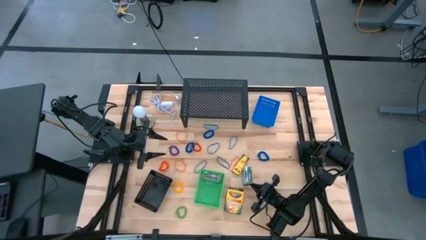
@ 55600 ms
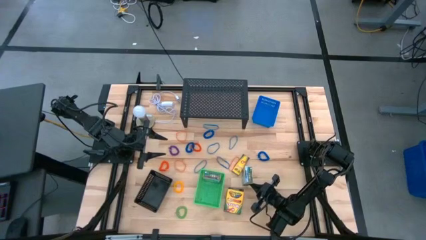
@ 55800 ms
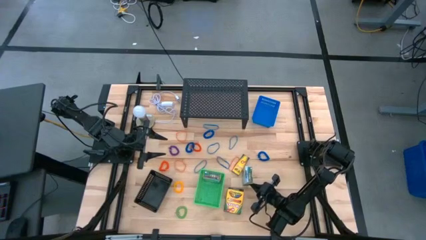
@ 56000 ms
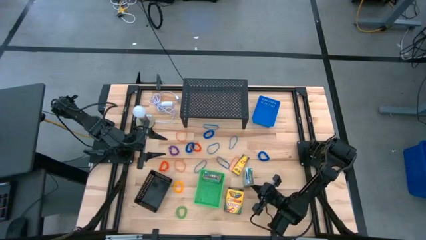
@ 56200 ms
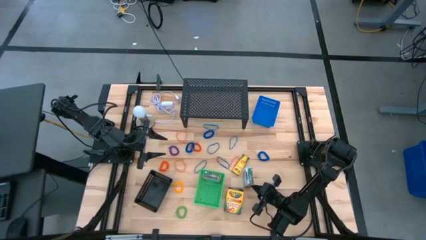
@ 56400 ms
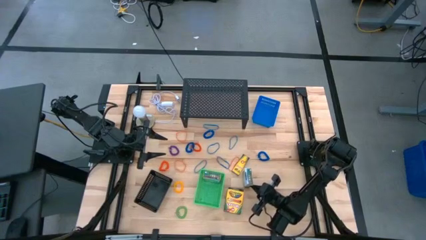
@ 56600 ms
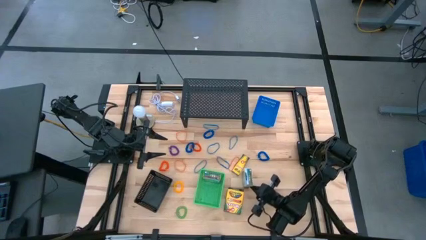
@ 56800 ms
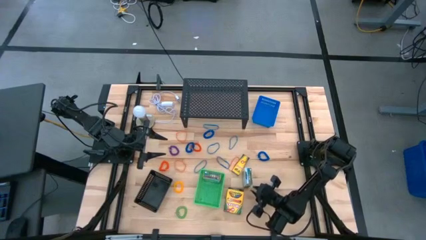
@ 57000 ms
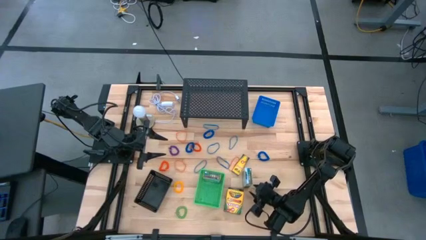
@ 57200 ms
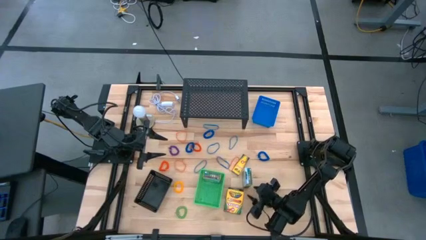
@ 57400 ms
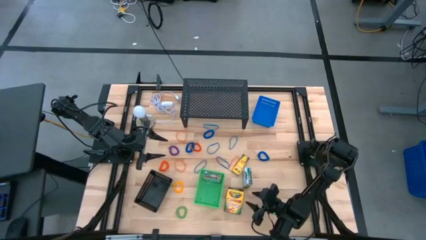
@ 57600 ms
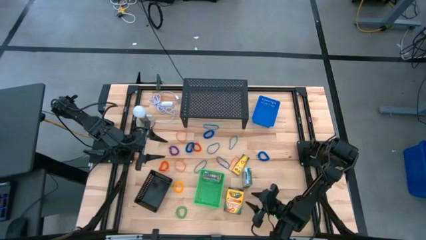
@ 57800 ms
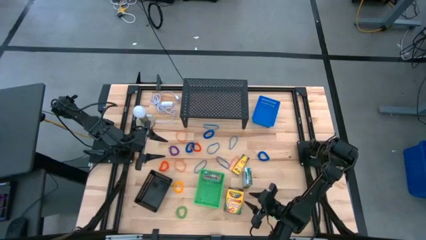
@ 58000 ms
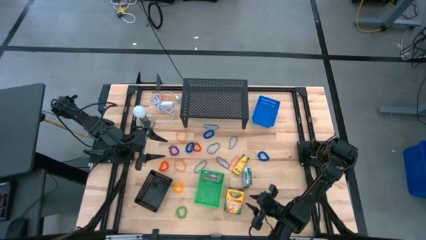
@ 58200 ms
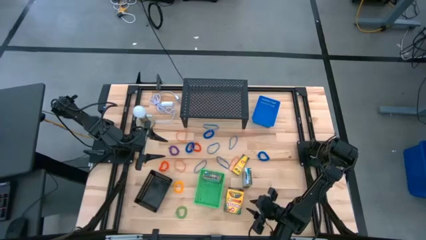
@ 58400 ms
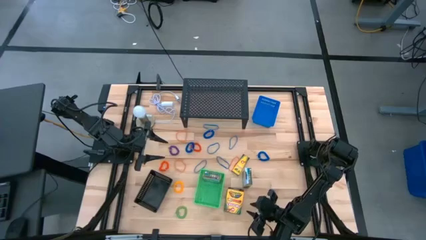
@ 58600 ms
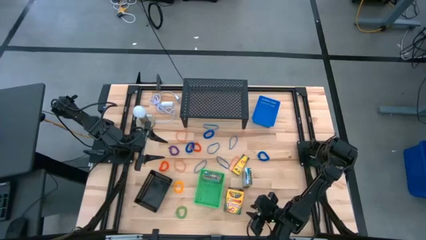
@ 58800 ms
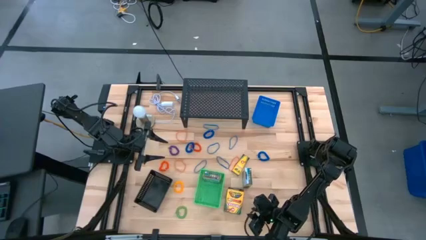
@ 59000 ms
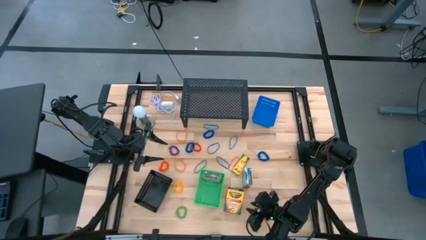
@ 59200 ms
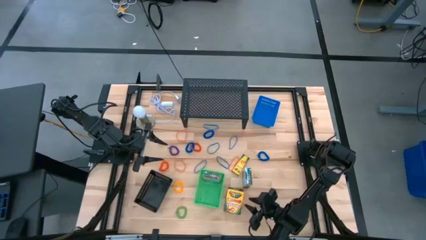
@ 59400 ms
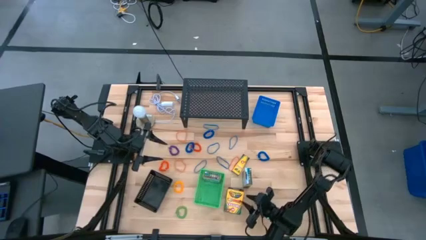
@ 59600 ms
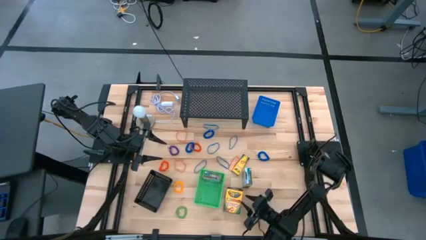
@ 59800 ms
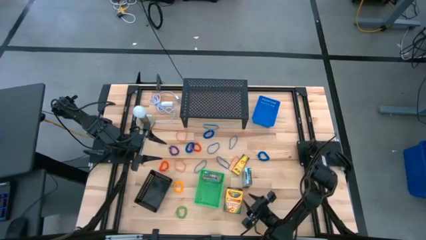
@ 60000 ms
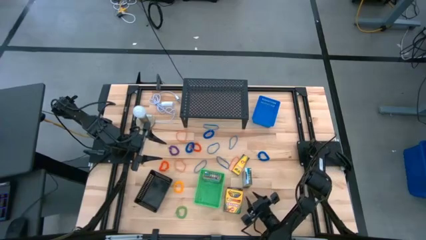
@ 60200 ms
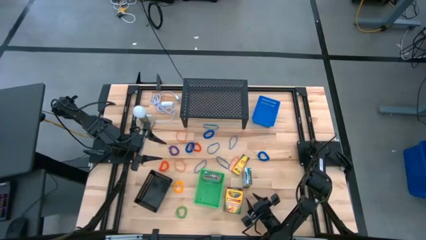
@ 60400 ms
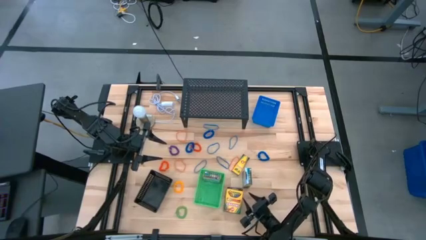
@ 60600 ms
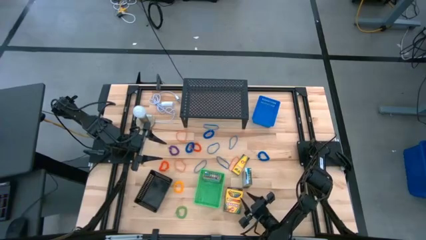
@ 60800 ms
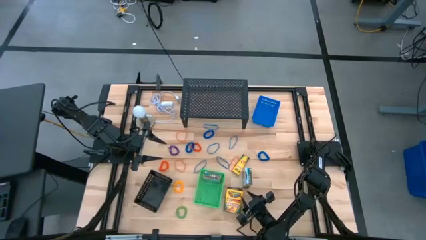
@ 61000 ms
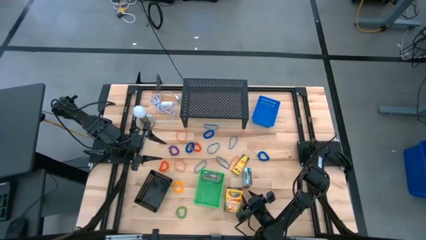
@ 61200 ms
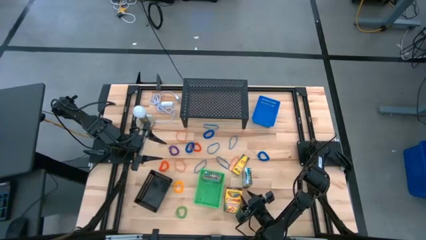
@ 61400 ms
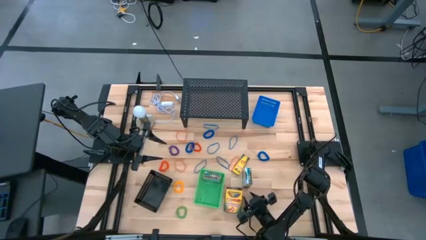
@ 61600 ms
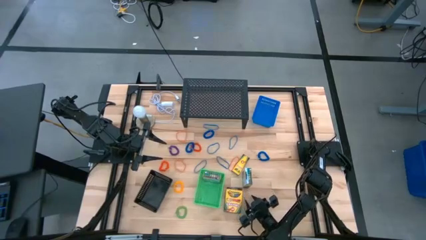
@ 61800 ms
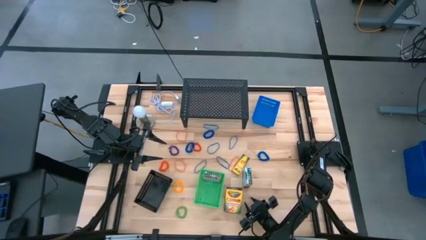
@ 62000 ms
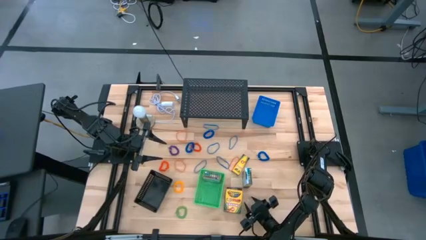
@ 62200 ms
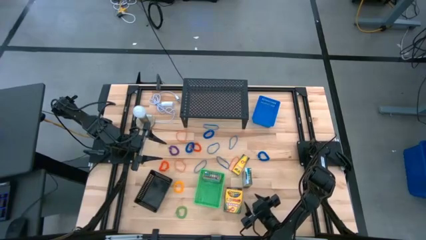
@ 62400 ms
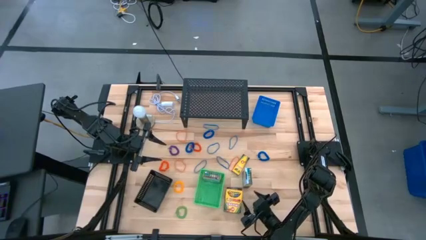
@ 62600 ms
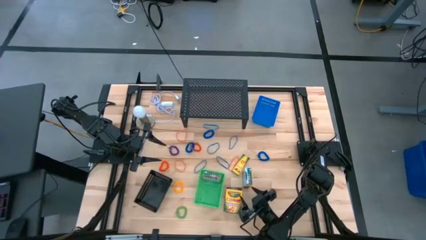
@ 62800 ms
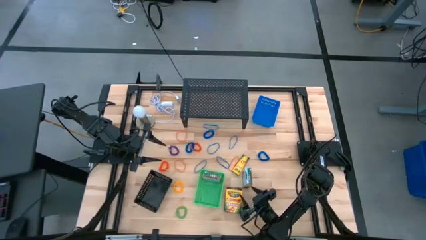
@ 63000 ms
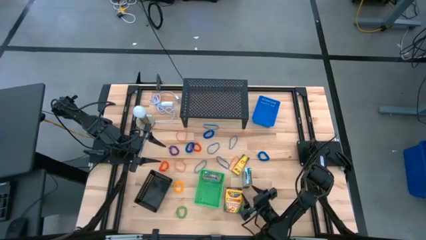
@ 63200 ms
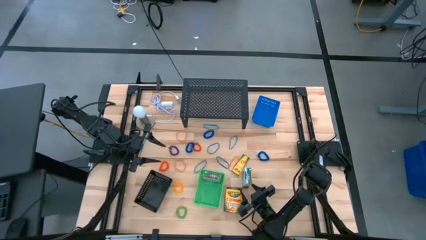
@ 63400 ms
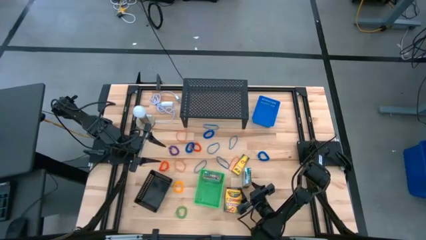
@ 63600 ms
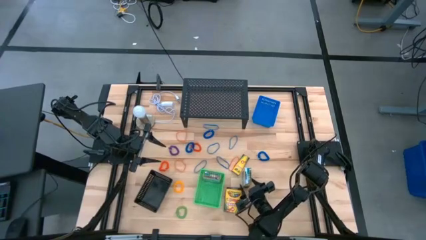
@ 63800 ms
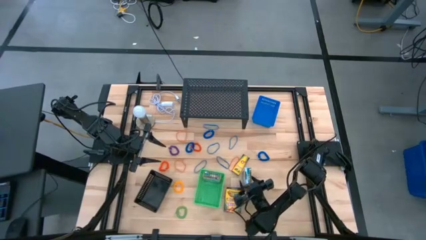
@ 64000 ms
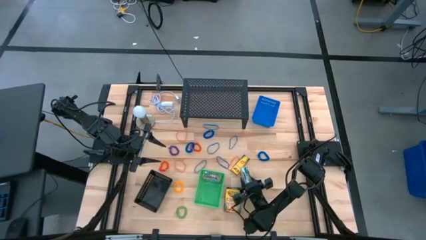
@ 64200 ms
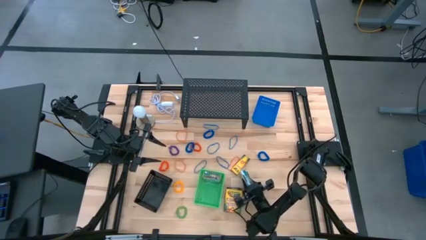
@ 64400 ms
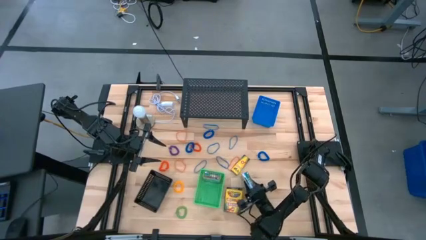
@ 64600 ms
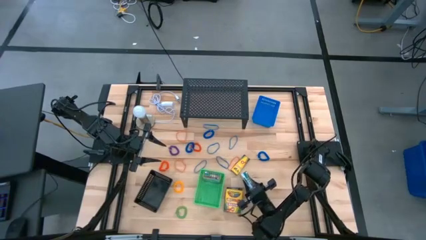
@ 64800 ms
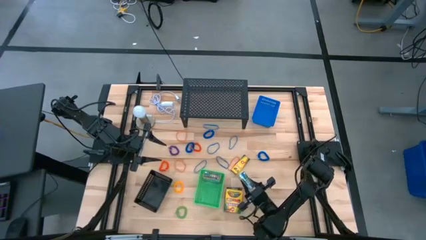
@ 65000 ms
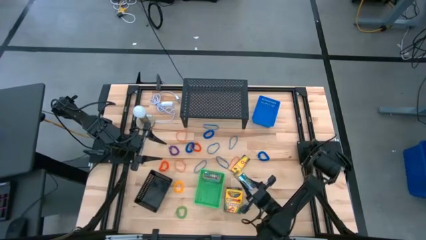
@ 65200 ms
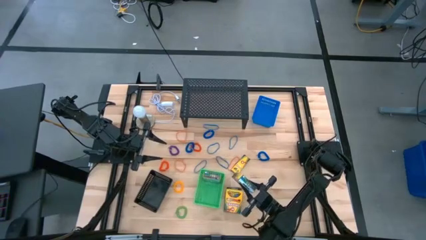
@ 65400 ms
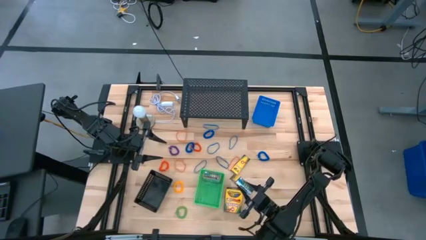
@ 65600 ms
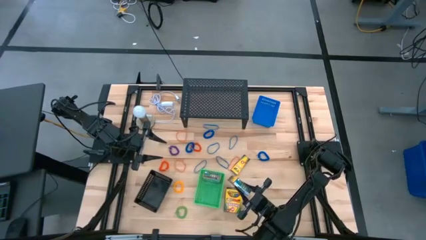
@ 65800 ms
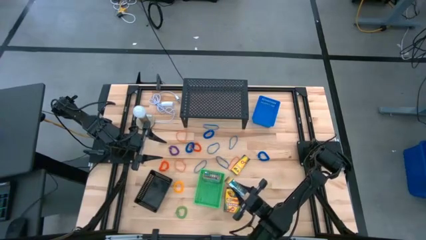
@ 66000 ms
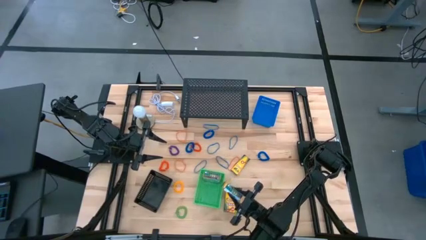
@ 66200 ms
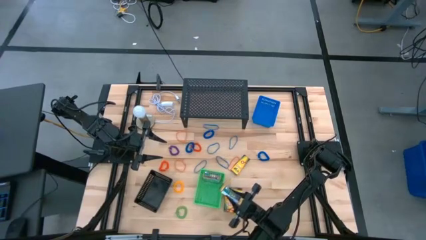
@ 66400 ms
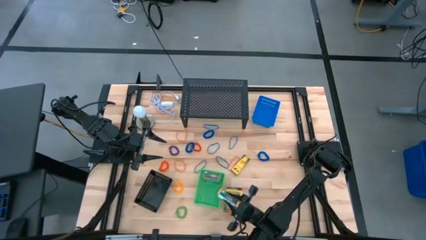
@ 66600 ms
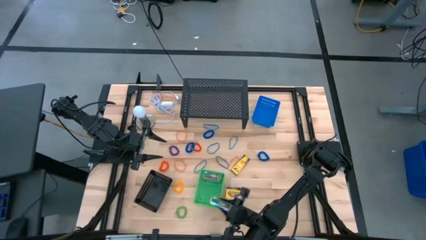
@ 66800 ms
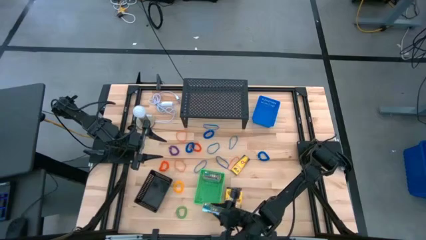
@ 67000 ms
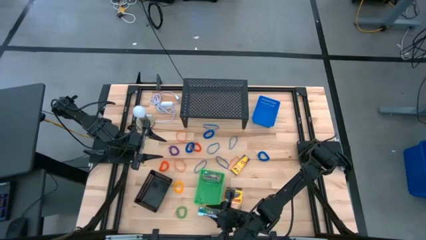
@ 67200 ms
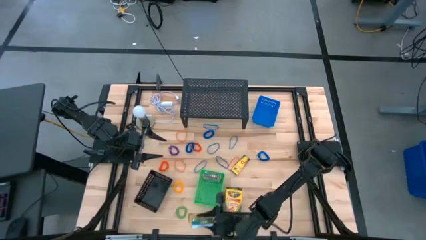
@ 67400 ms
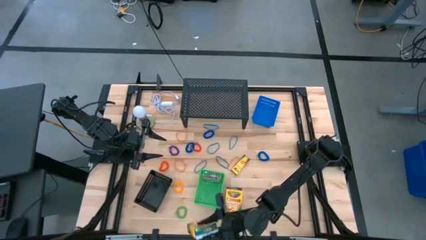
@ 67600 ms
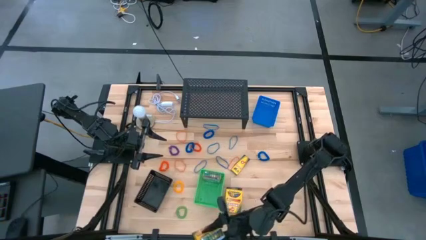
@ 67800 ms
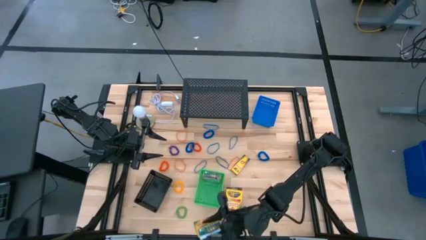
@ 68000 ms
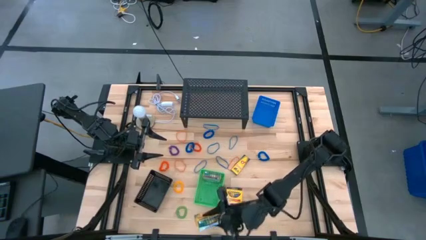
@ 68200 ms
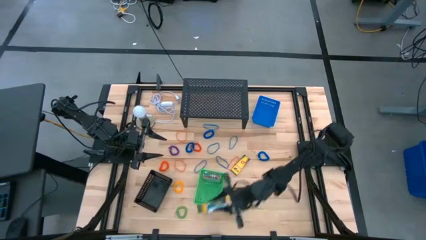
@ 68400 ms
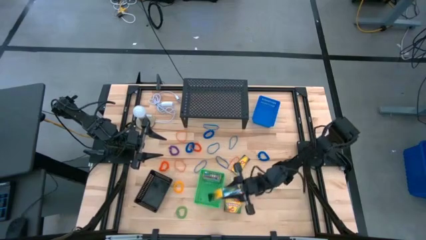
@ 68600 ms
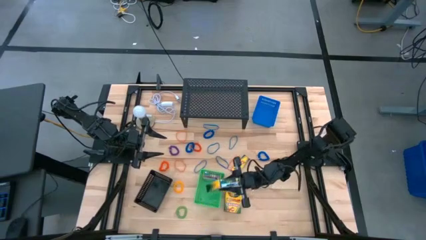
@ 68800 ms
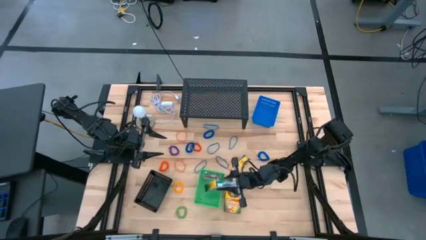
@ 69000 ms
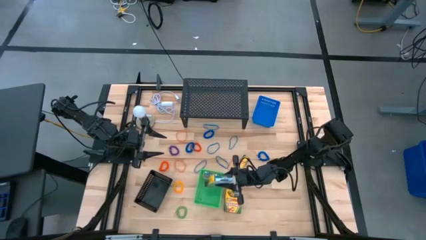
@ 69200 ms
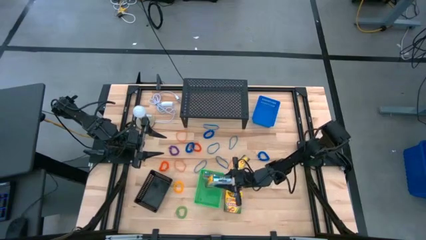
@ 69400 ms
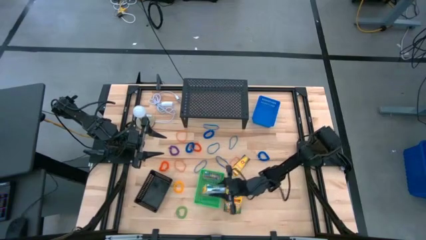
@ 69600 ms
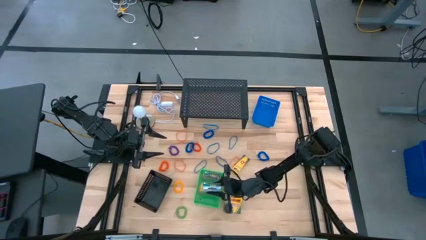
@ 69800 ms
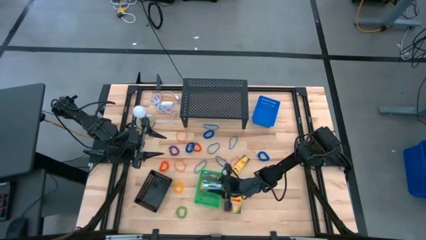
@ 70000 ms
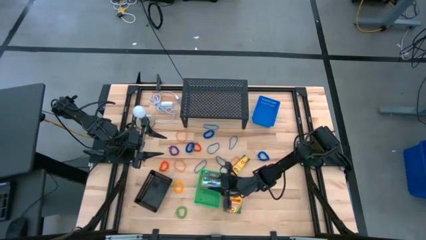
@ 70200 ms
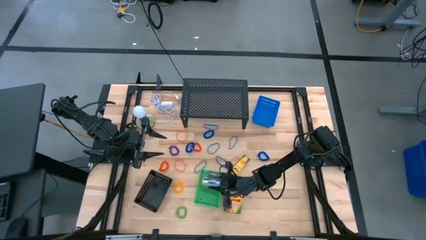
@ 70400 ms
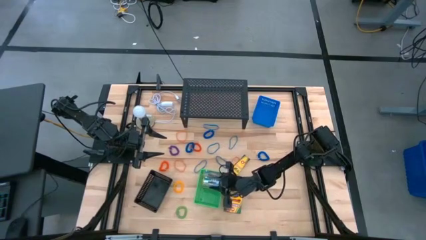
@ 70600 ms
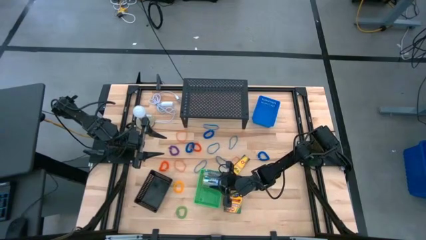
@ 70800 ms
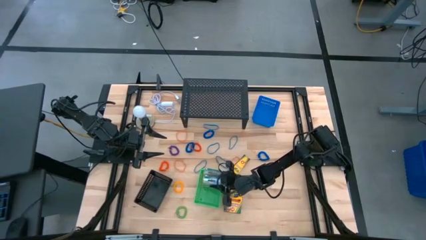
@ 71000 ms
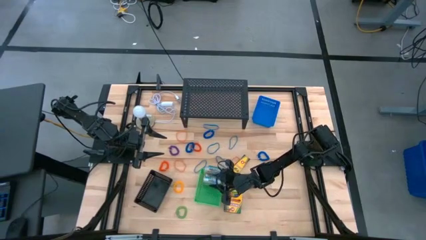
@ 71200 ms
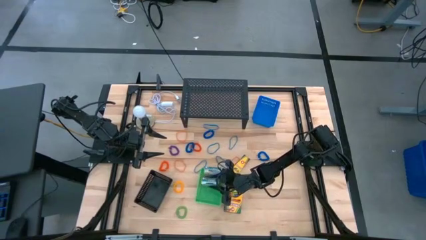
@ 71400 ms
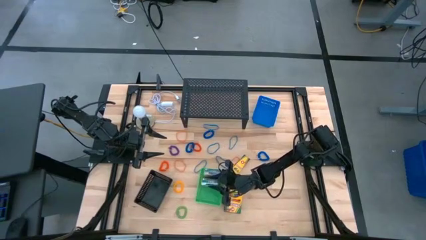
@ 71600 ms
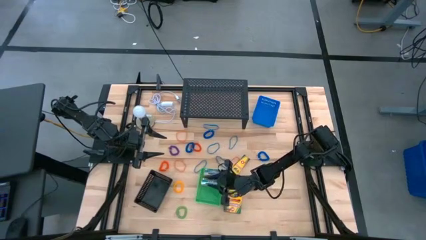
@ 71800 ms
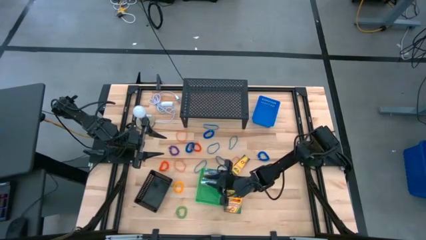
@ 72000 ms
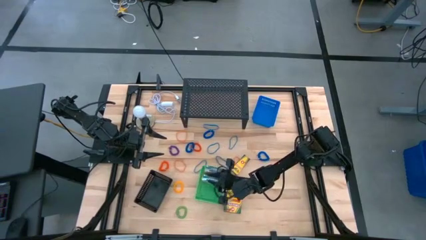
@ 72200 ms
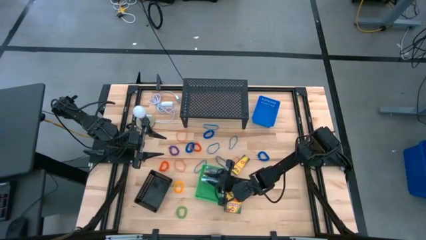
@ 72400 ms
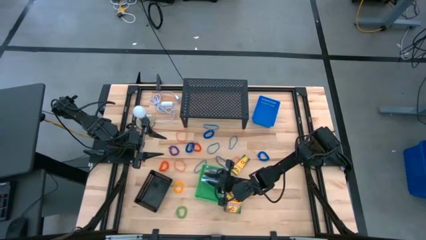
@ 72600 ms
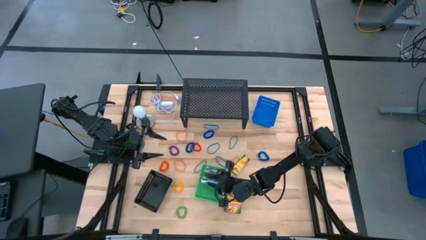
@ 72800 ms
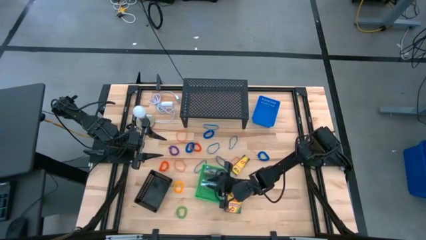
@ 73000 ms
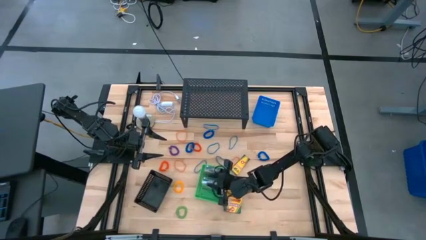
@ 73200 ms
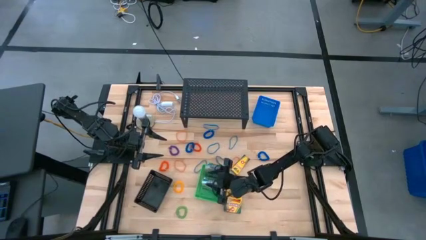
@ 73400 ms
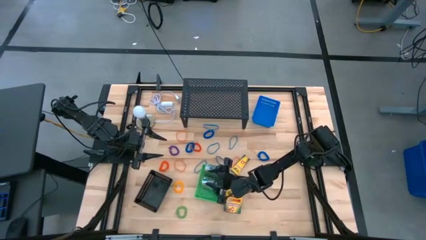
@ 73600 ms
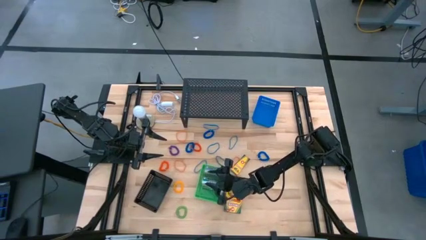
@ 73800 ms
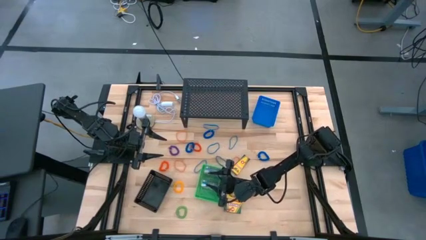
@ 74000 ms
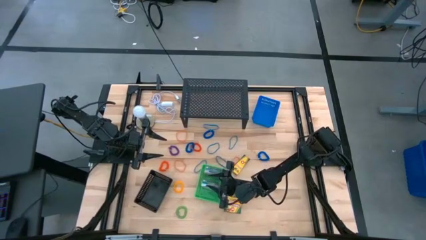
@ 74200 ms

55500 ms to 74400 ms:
Task: Pick & Place Office Desk Supplies
Put the crayon box into the green bin
